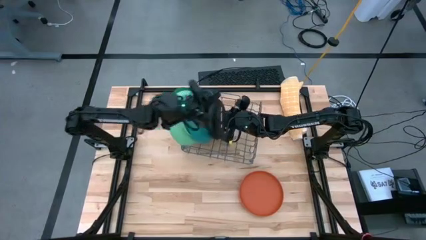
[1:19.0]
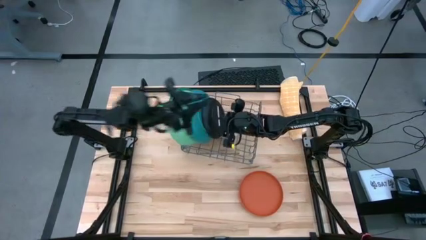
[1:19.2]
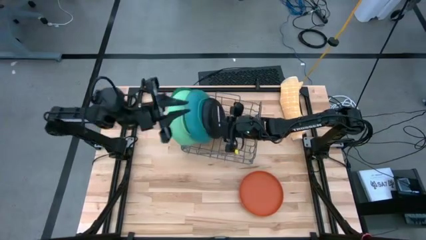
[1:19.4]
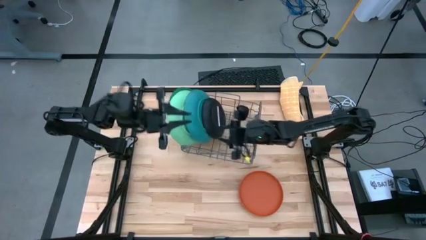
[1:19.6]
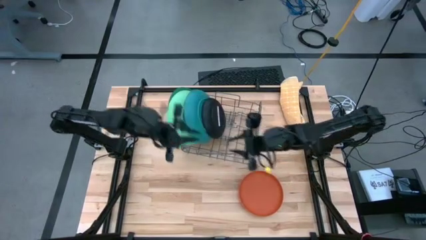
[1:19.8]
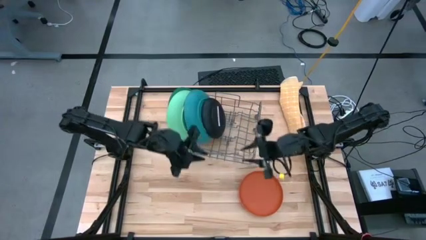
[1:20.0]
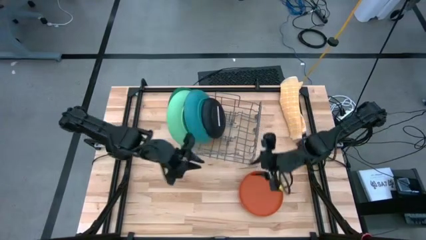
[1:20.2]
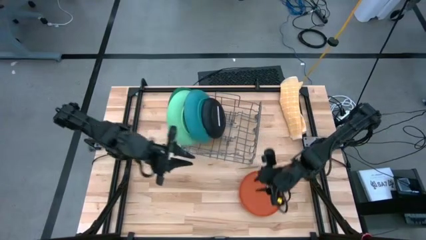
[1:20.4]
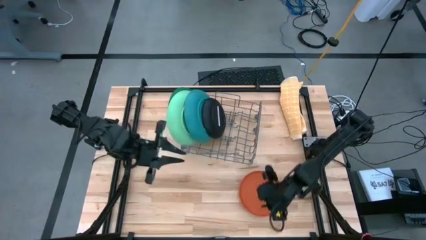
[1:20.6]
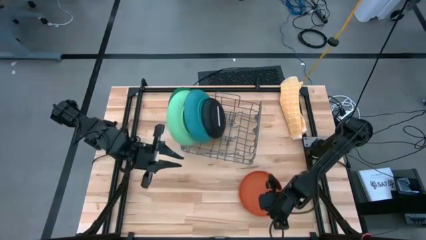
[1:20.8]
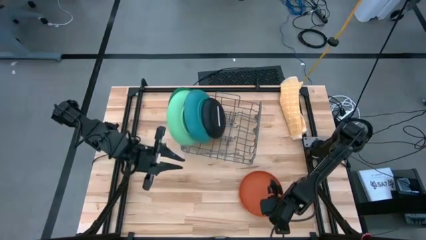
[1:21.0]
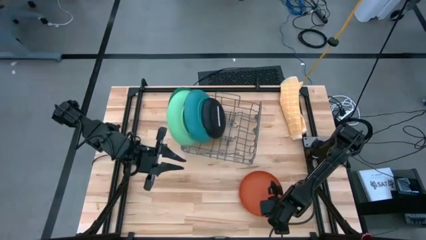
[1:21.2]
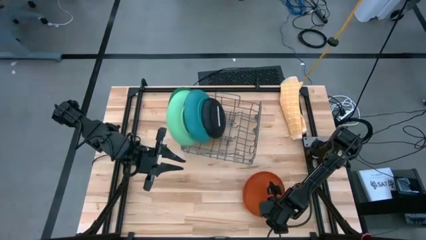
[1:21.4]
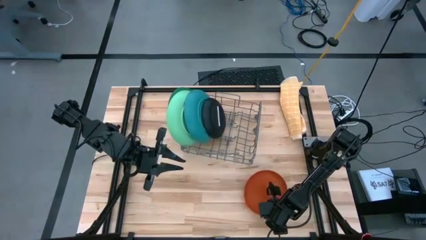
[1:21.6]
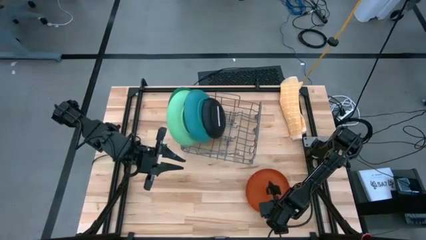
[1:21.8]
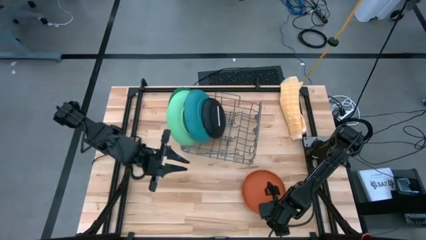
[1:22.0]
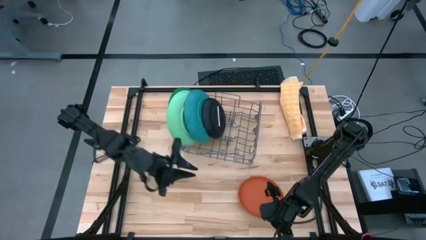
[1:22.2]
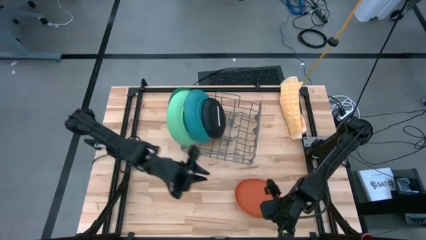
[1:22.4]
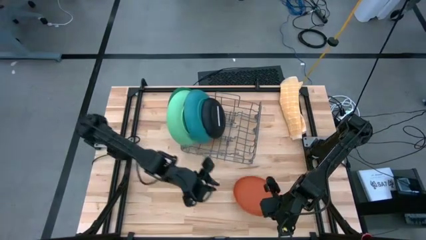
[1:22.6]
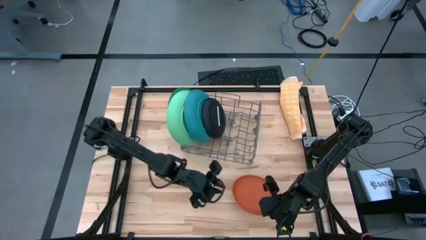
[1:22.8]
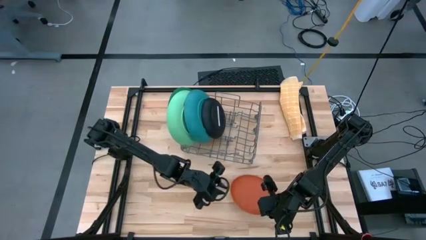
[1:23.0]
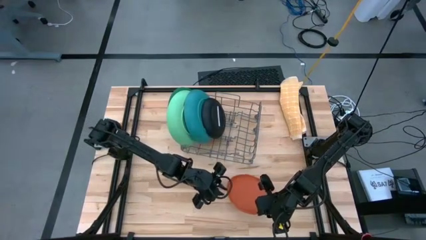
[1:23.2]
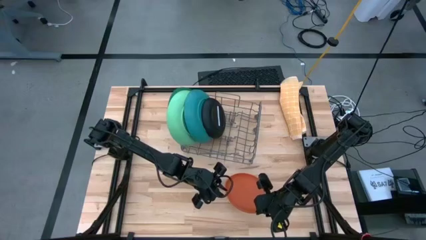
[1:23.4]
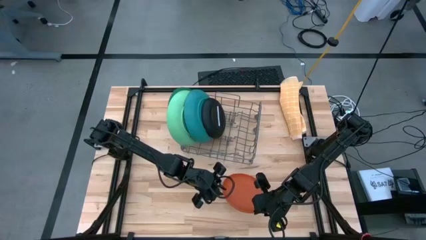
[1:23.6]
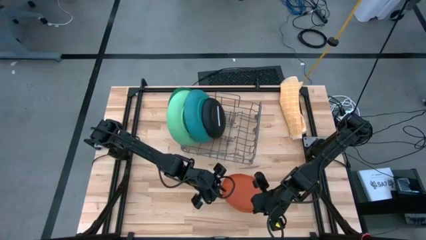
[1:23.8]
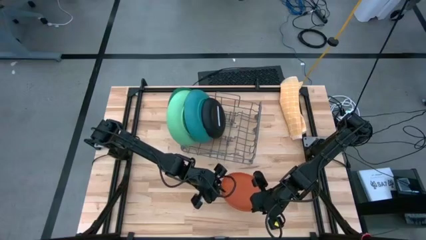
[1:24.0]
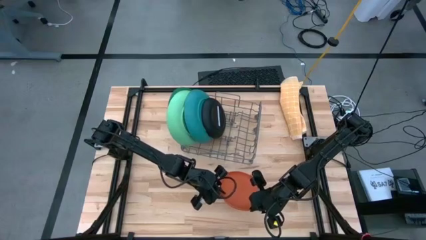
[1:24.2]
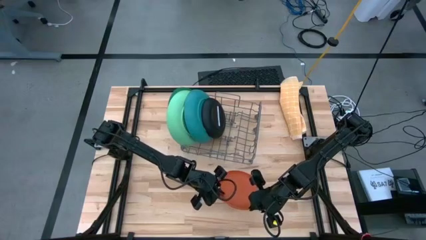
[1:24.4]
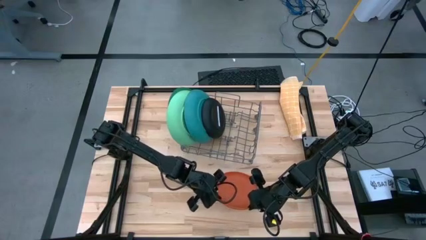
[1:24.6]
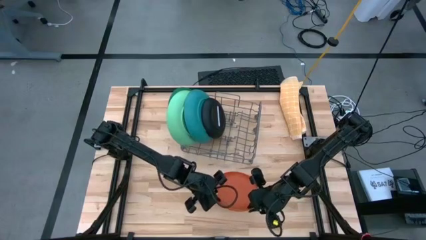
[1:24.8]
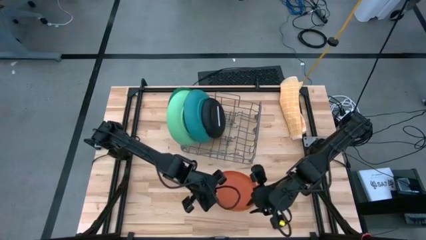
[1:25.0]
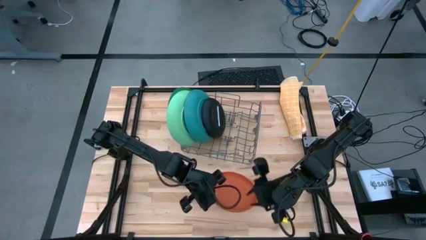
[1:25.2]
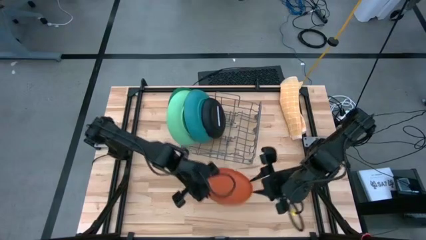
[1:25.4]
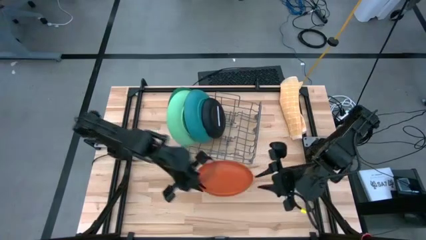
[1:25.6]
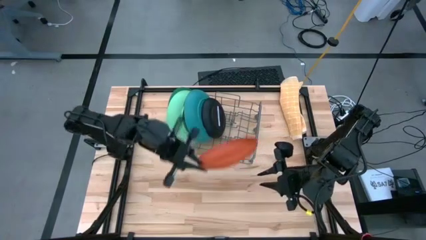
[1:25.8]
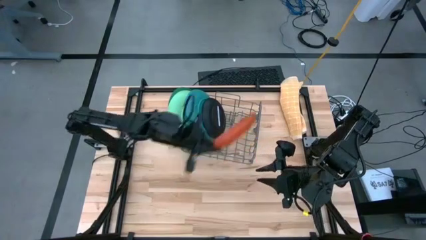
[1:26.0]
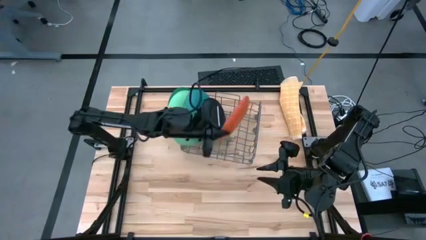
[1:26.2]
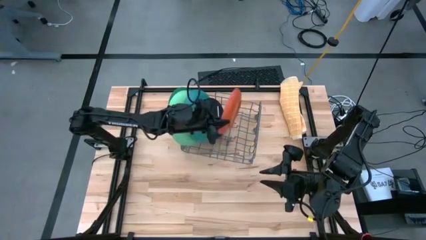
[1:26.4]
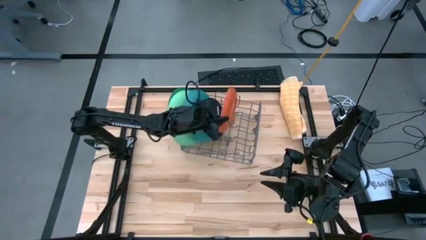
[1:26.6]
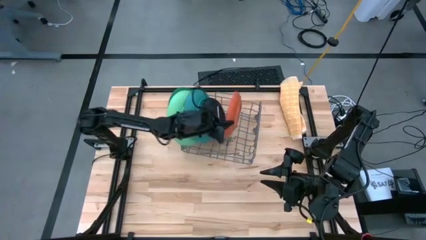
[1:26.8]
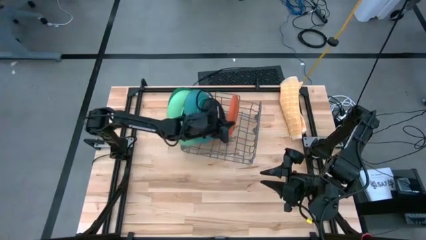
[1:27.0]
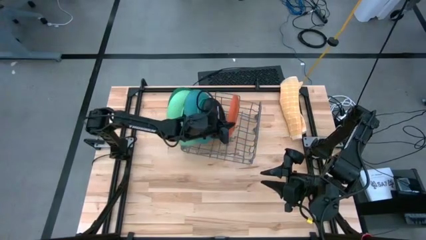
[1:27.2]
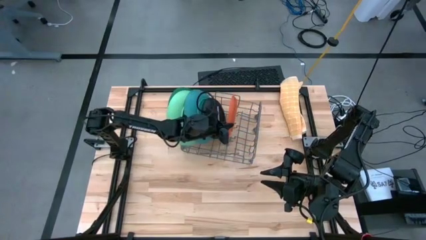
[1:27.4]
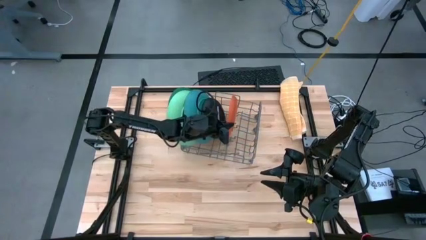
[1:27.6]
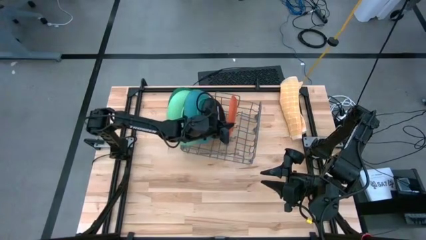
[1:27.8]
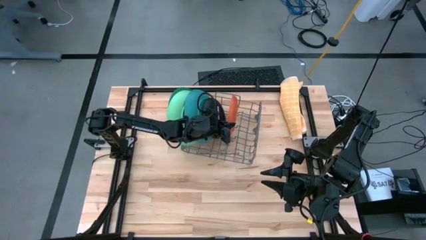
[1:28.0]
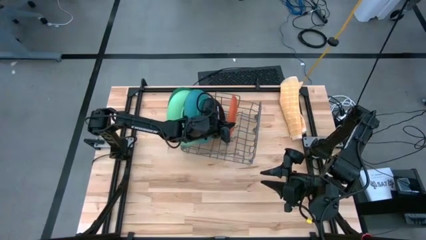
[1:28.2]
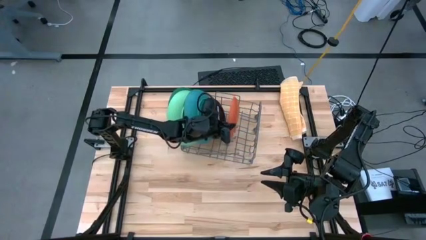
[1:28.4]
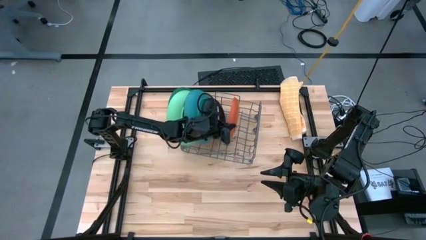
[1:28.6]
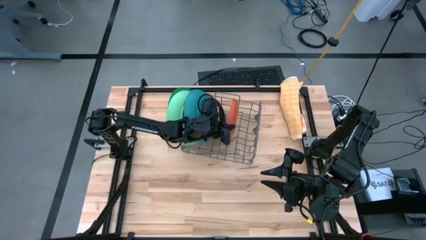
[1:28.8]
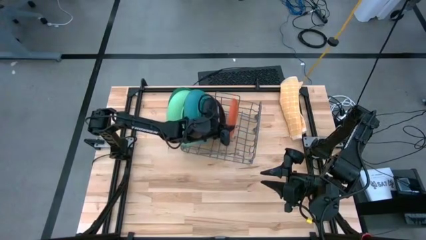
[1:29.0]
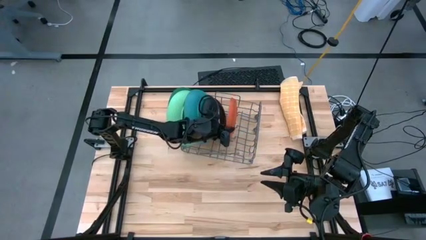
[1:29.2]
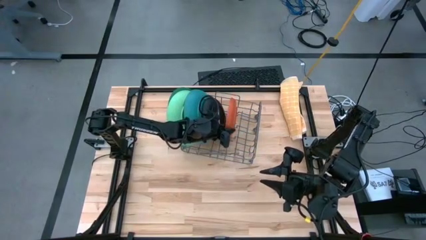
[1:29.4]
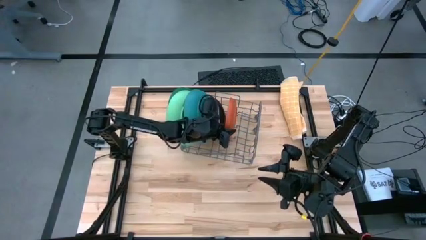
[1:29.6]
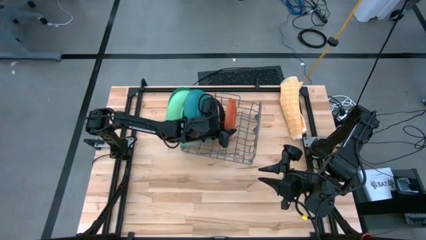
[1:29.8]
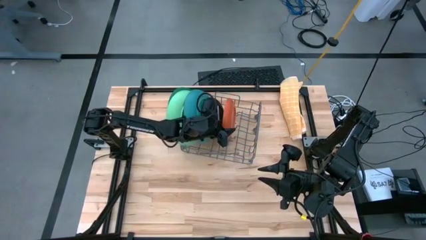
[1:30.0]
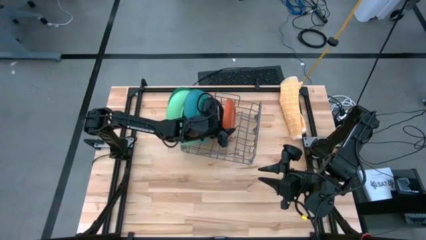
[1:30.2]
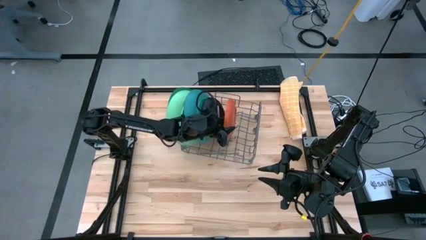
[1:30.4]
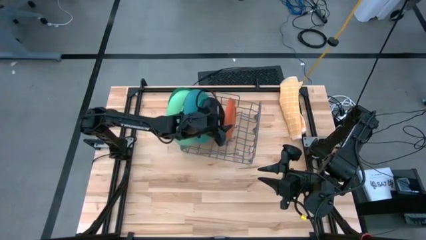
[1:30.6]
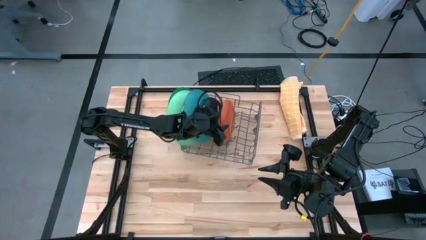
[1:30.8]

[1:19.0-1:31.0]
Task: Sort dishes
Put the orange plate into the dish rack

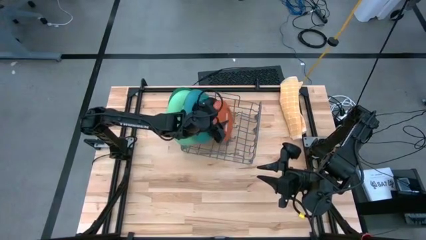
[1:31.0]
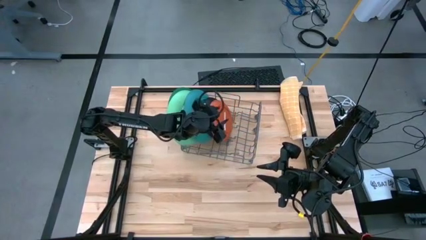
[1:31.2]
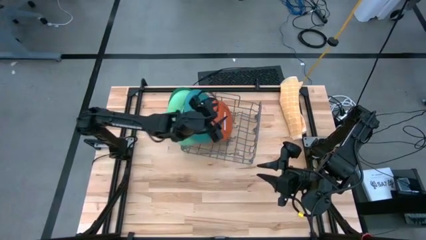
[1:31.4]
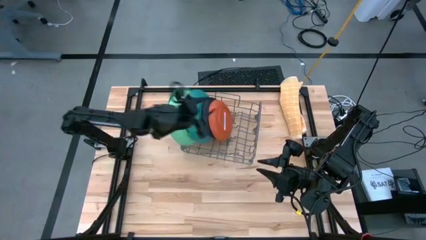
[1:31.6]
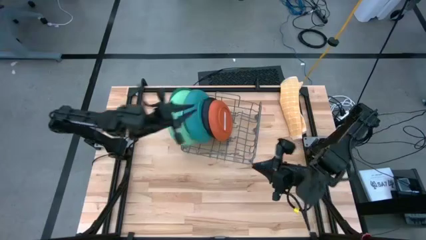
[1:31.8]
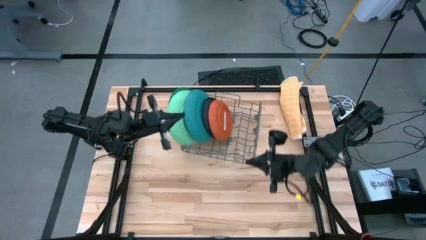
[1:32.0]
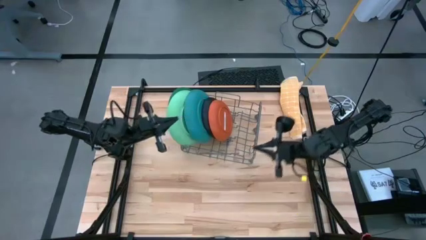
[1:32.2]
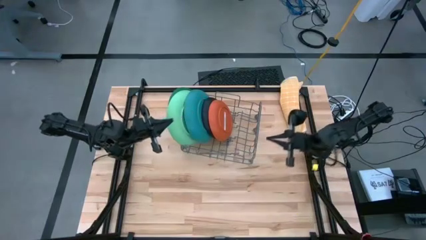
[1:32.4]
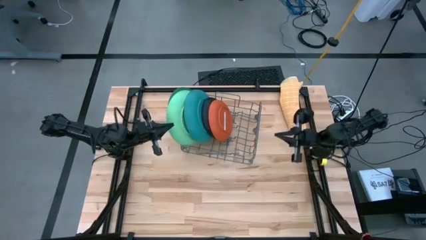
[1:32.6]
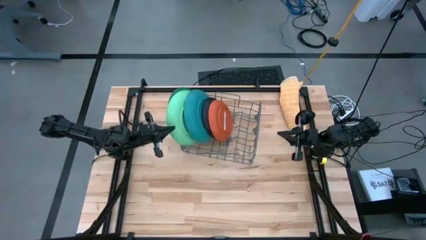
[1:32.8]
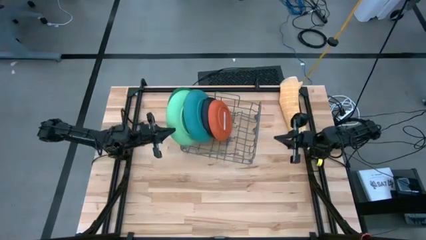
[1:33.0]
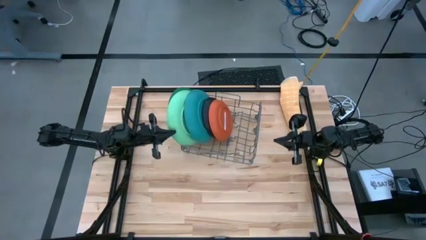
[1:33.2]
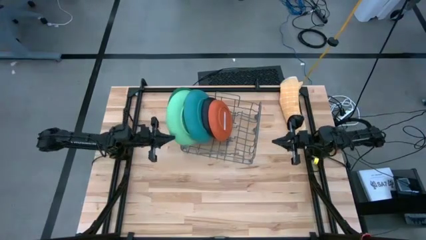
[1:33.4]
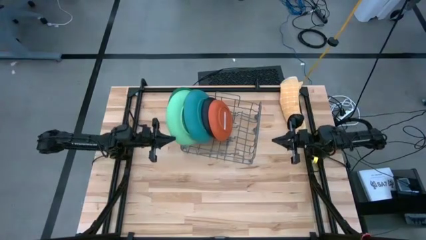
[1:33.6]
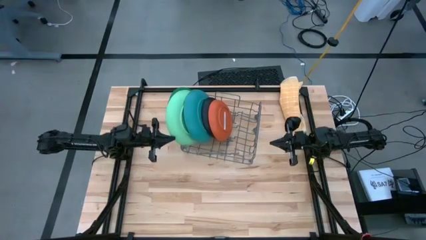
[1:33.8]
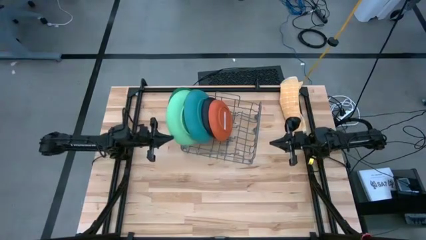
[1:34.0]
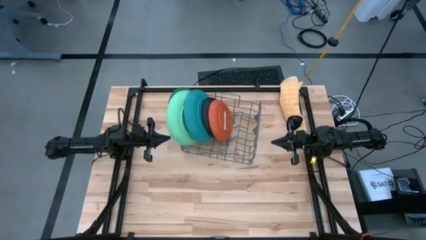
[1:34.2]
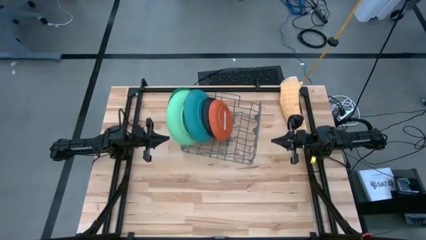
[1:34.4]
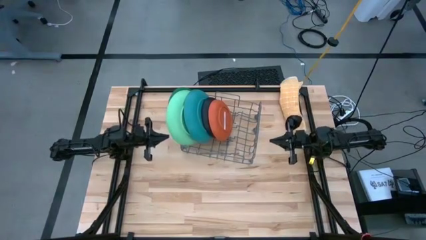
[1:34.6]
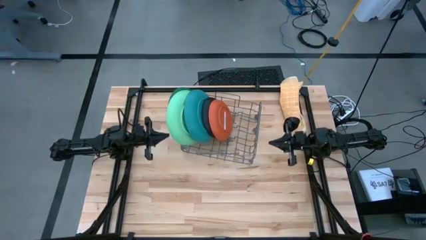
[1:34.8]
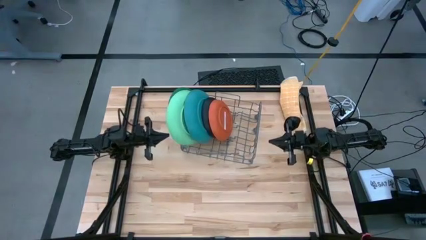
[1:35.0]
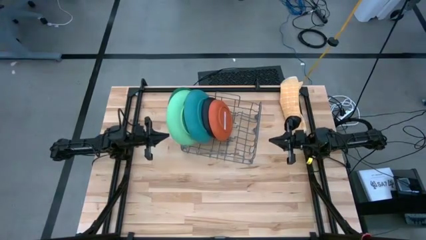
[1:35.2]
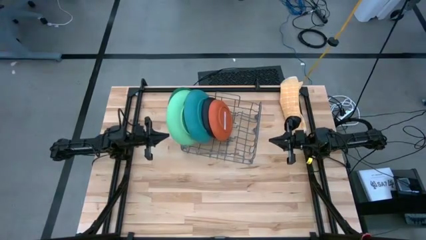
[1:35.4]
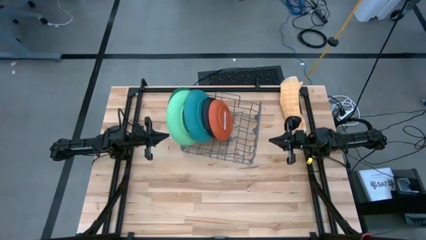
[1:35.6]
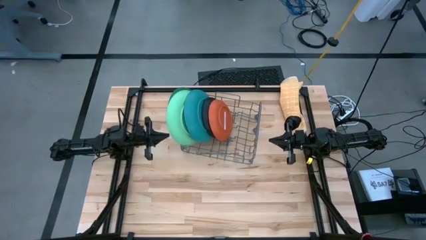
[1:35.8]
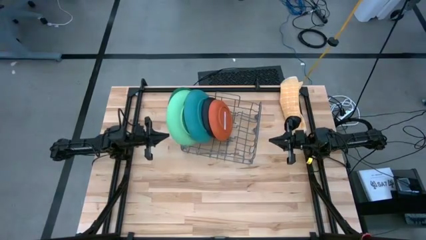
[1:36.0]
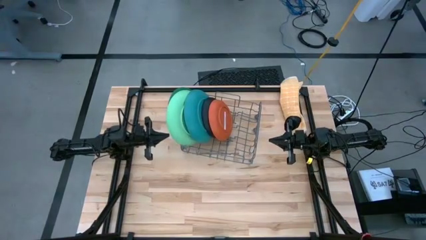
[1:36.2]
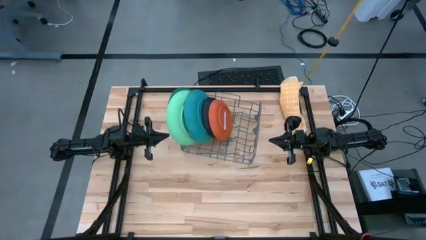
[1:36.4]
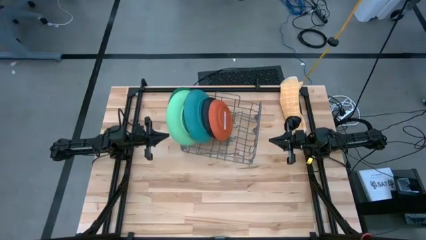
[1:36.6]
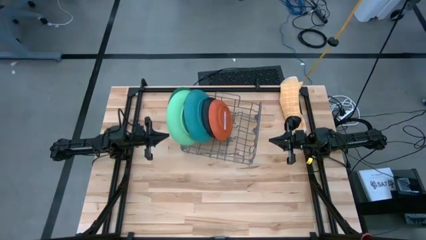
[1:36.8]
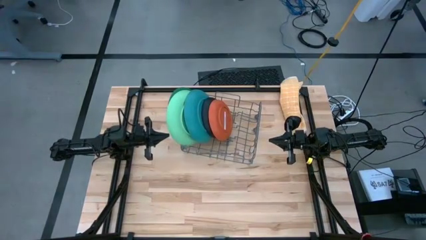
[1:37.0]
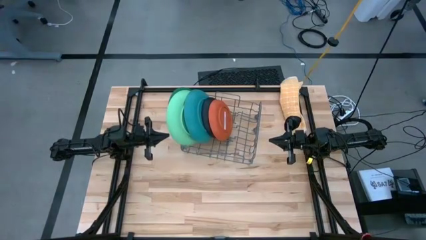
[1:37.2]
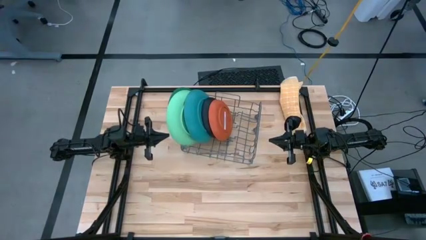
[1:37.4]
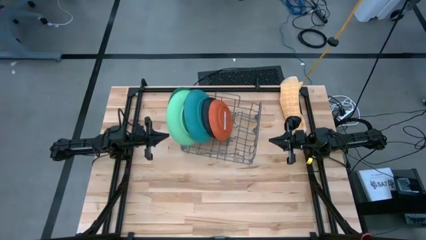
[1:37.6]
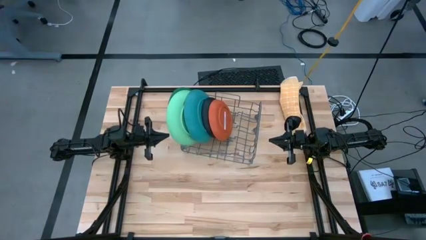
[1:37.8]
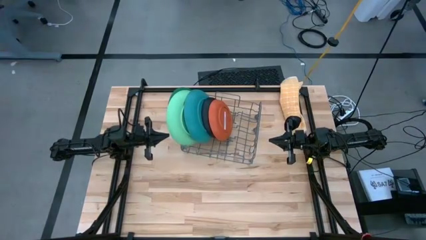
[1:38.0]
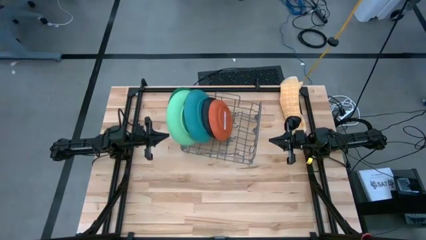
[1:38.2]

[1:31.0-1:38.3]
Return to Home Position
